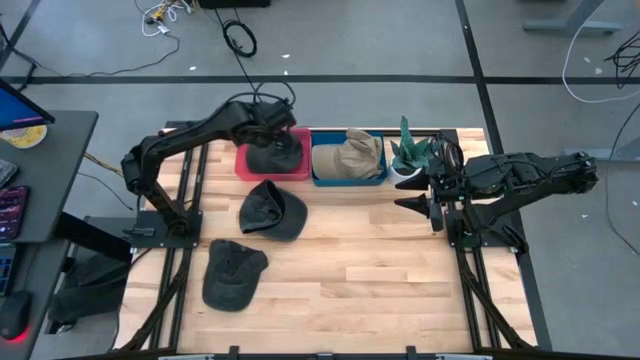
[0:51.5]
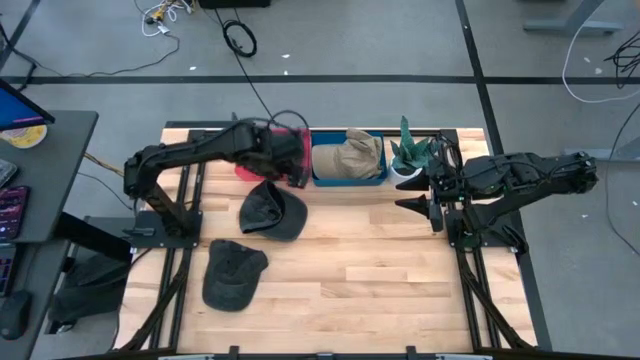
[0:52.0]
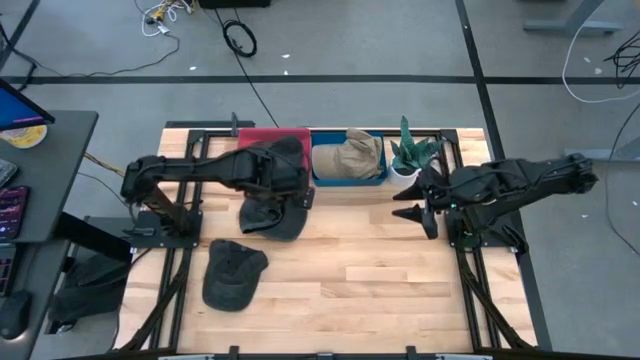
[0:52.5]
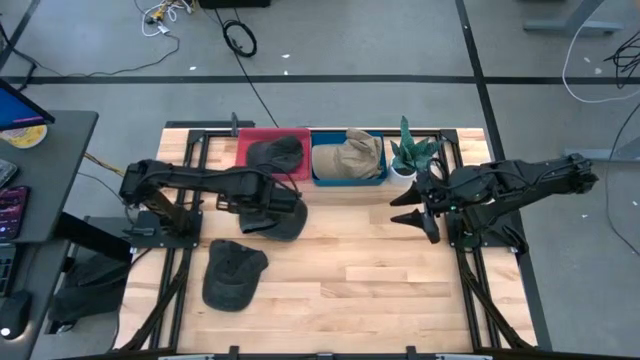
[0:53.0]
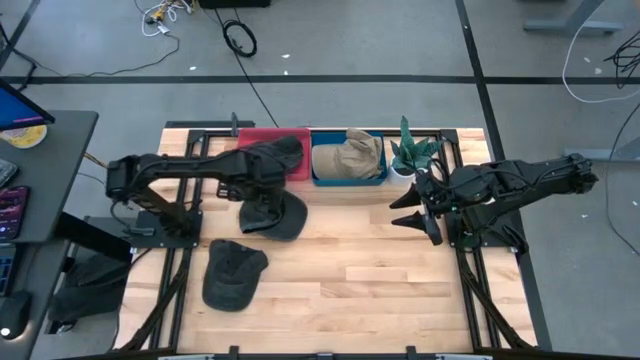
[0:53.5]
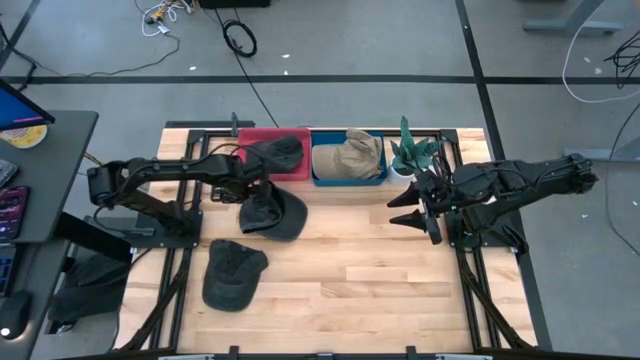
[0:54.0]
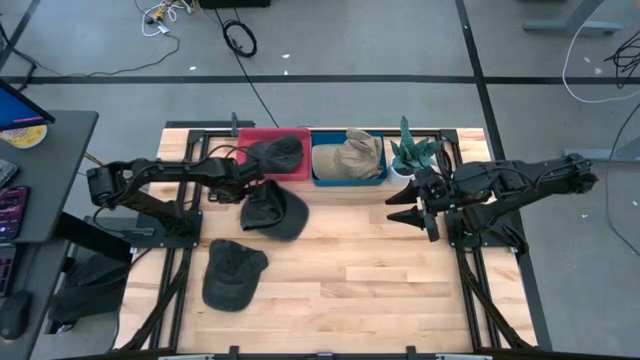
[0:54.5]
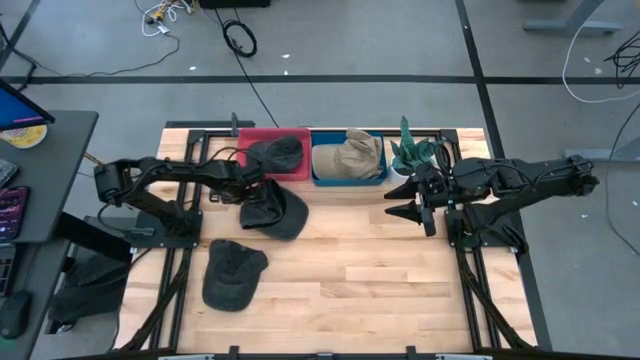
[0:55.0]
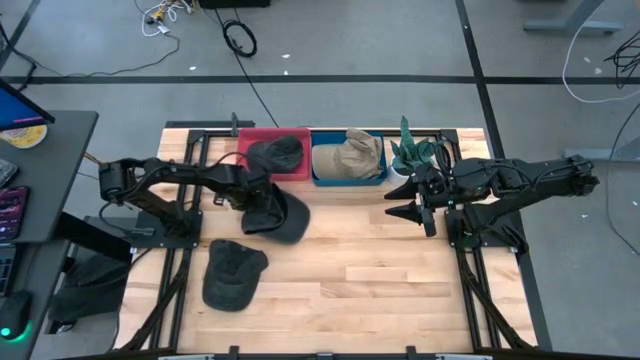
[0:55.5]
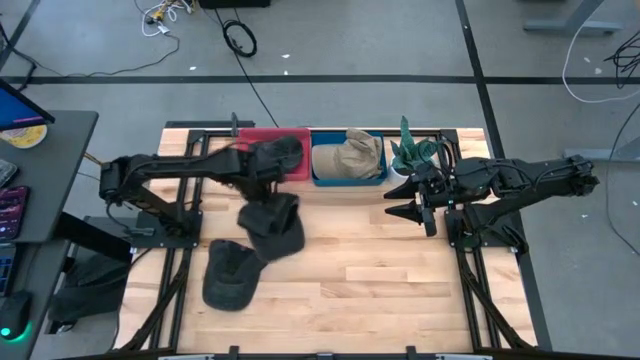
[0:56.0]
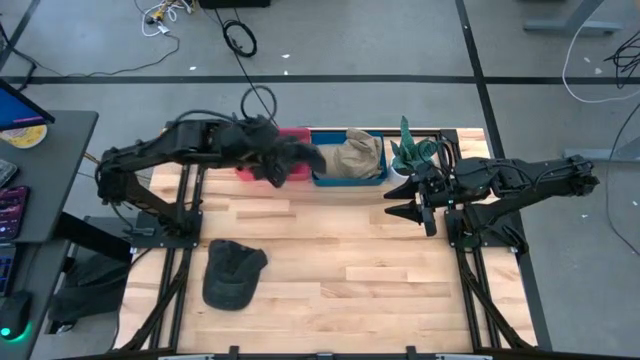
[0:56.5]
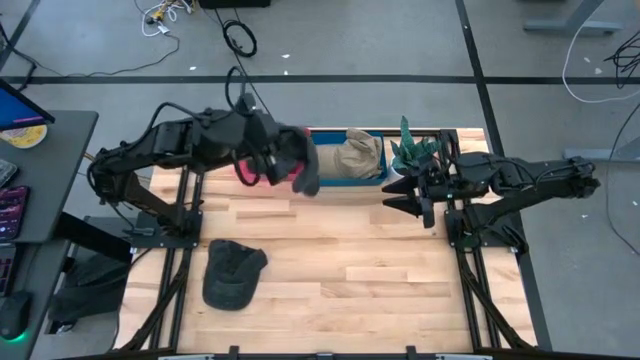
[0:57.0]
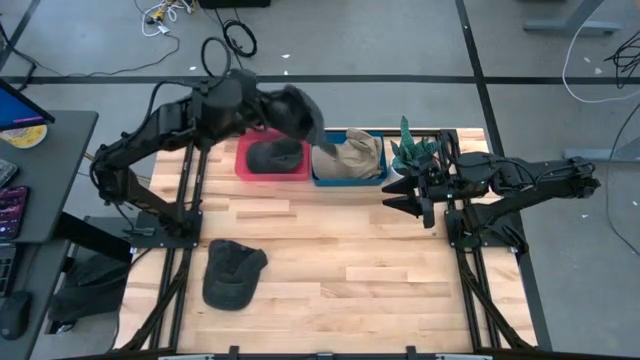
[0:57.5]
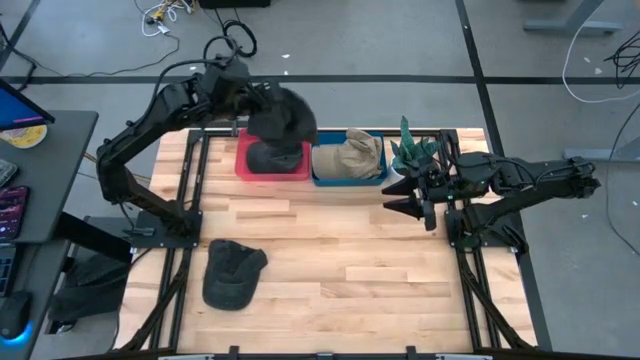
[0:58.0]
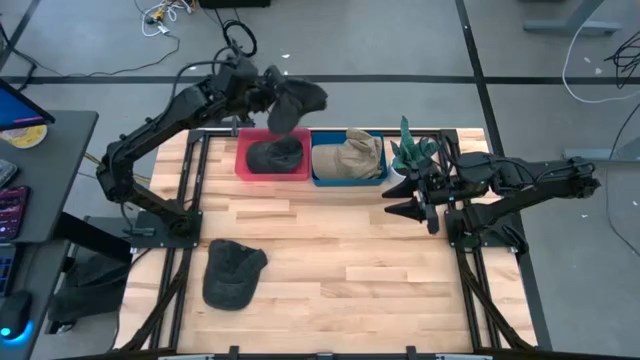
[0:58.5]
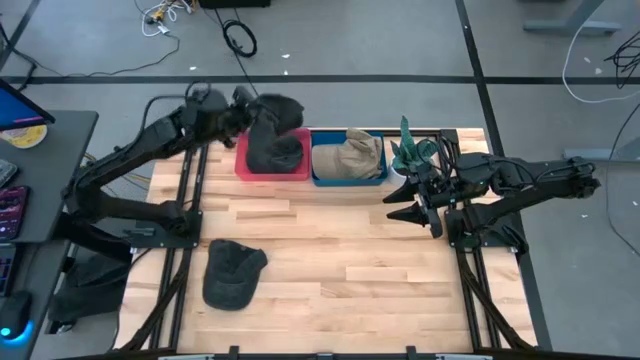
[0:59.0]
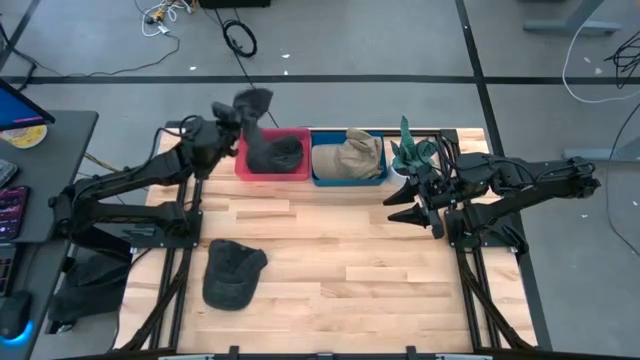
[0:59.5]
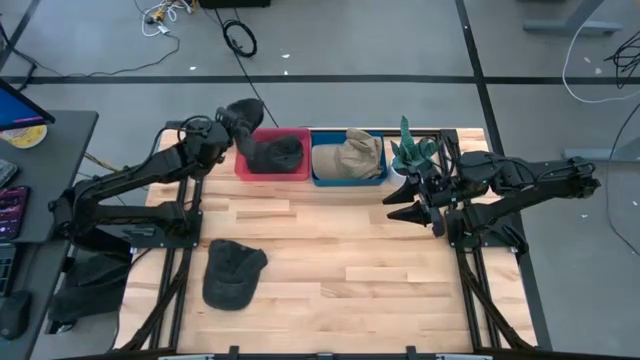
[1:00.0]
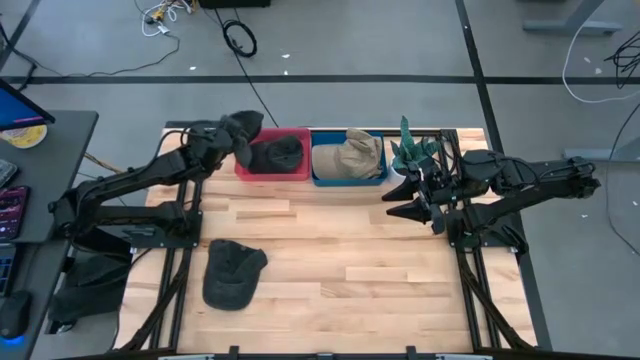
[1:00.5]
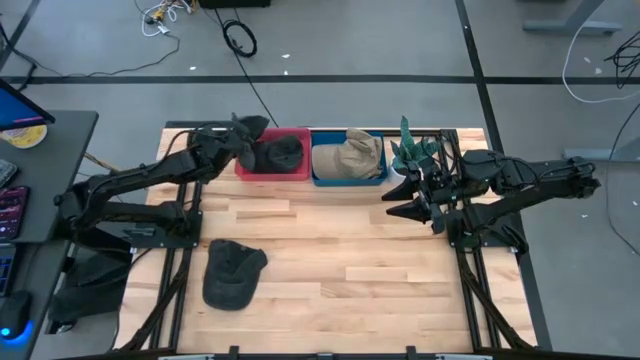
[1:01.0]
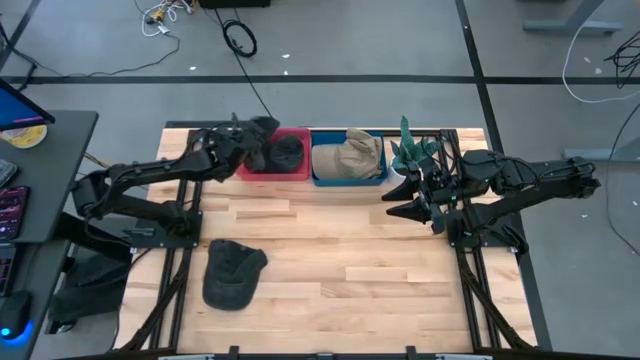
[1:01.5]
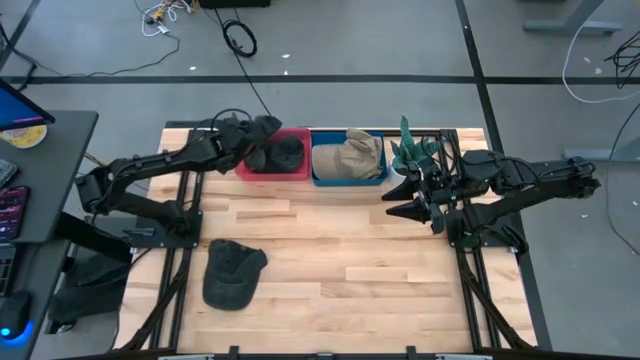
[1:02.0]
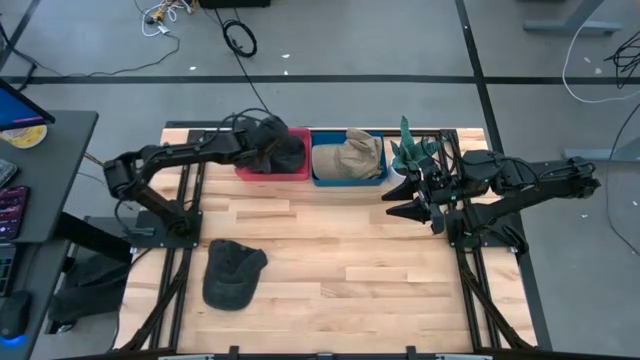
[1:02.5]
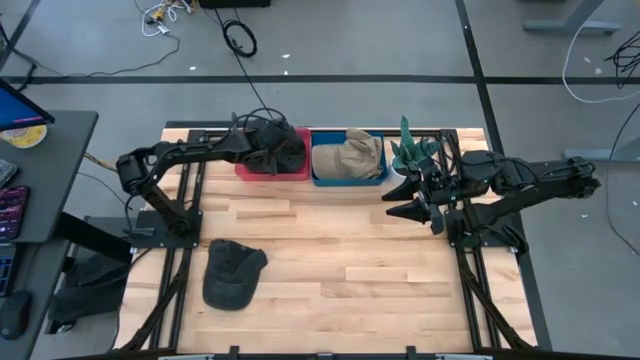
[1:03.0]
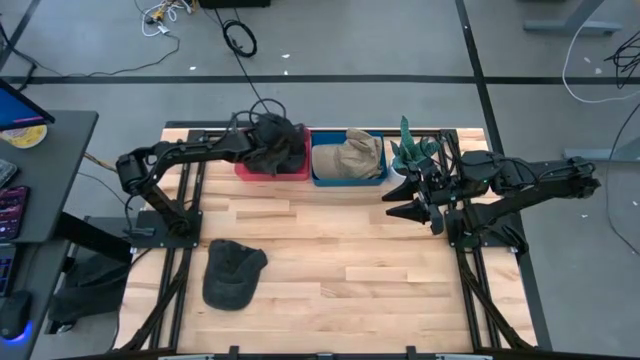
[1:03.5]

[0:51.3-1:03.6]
Task: Pick & Place hat
Put the top black cap into the red bin

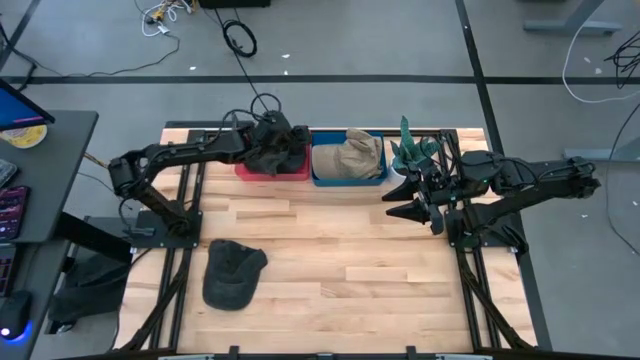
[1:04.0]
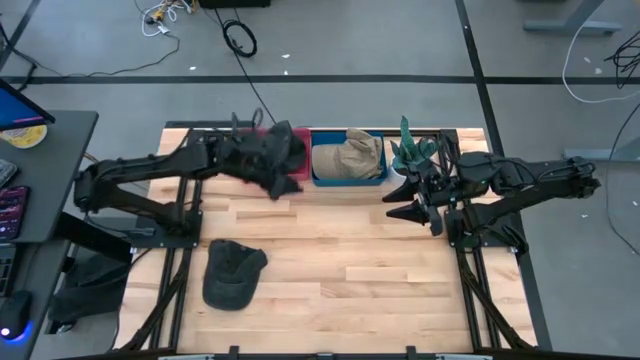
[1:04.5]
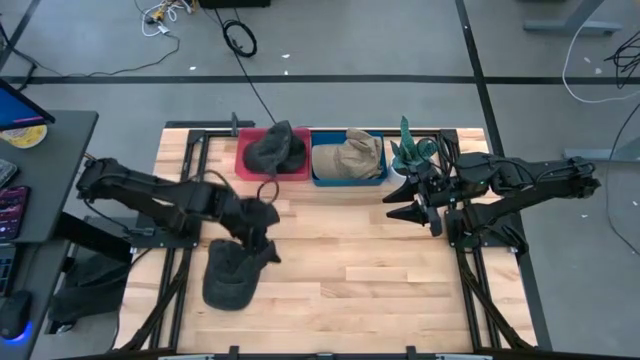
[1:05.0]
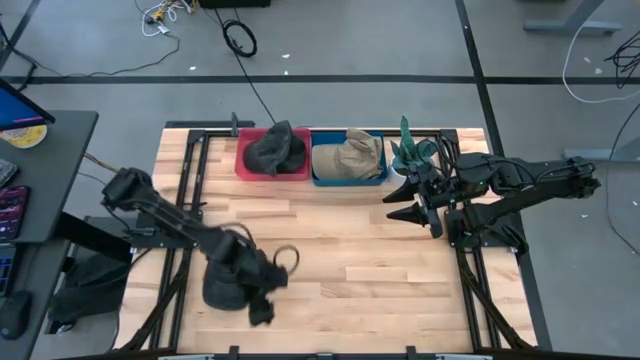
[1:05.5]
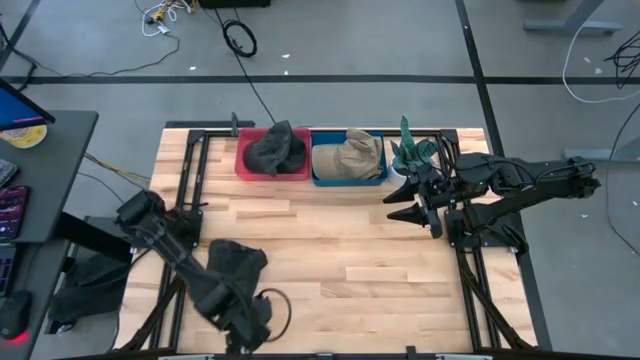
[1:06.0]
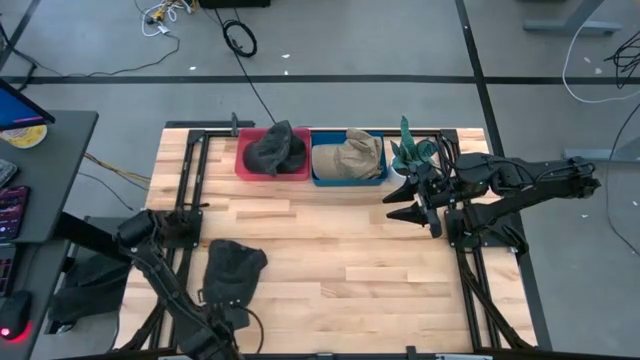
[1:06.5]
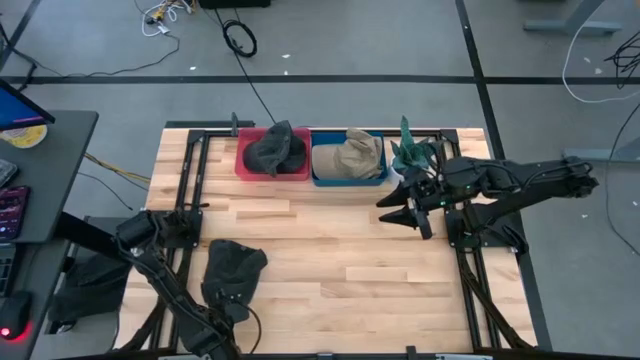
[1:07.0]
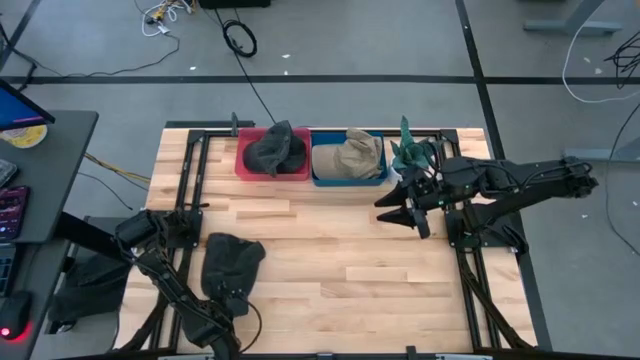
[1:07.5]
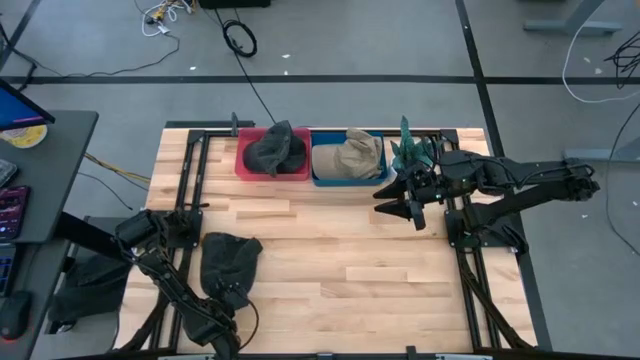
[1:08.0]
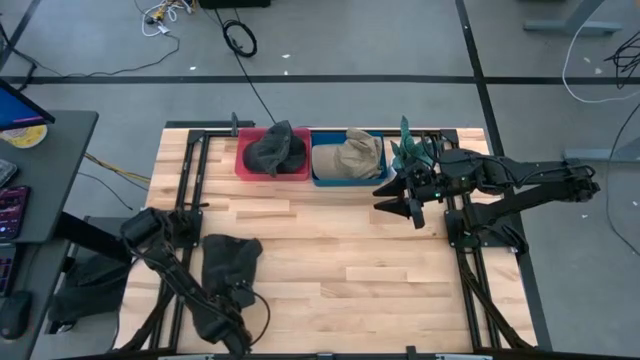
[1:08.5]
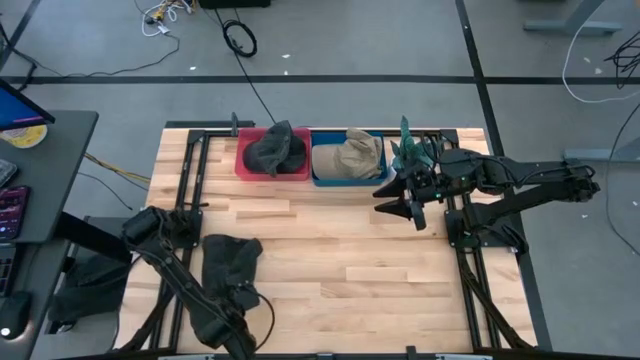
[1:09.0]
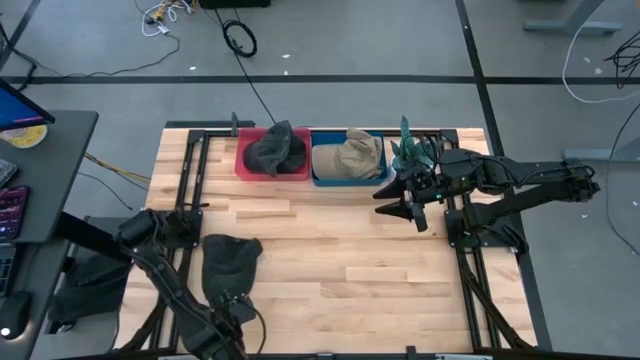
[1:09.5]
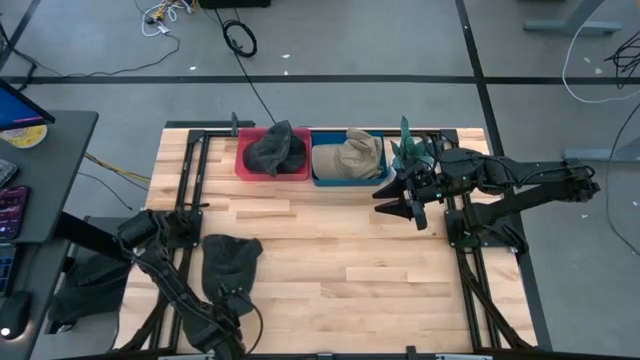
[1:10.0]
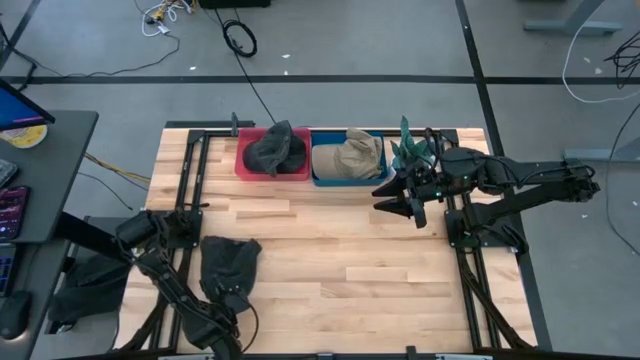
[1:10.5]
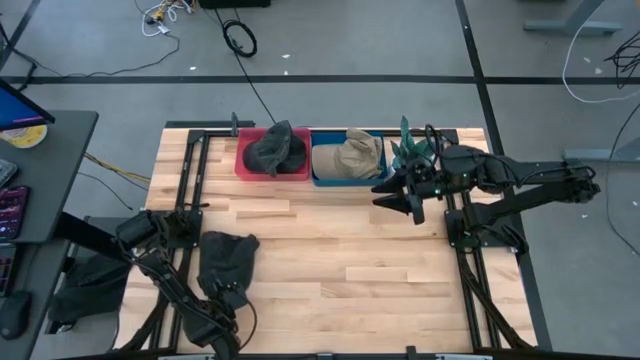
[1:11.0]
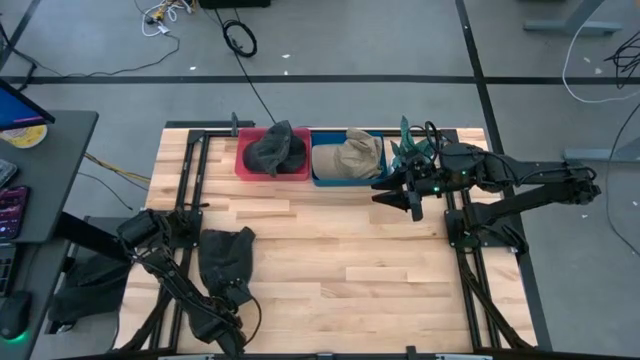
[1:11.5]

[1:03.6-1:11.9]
Put the black cap into the red bin
